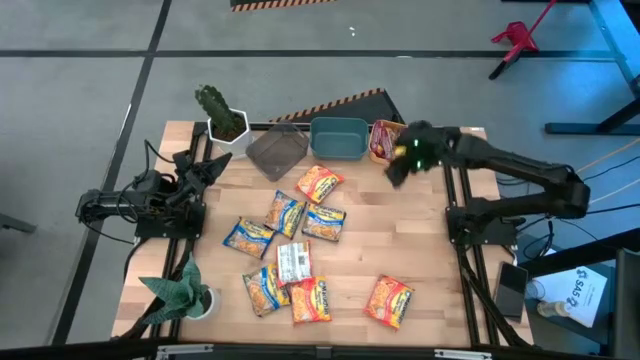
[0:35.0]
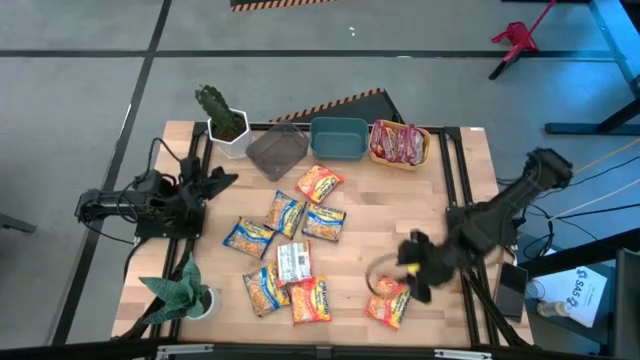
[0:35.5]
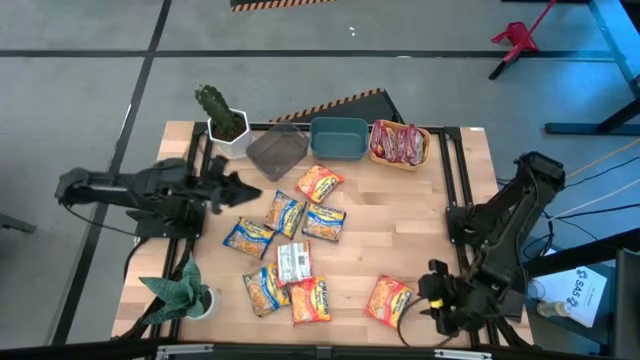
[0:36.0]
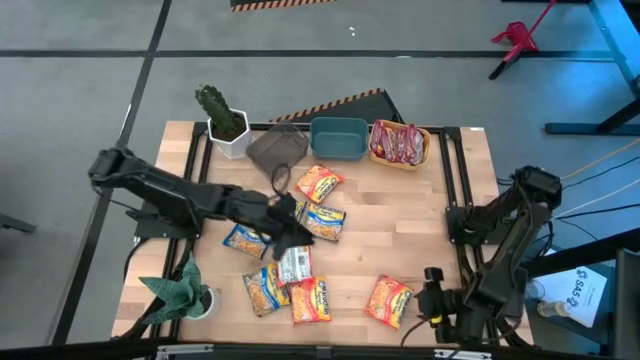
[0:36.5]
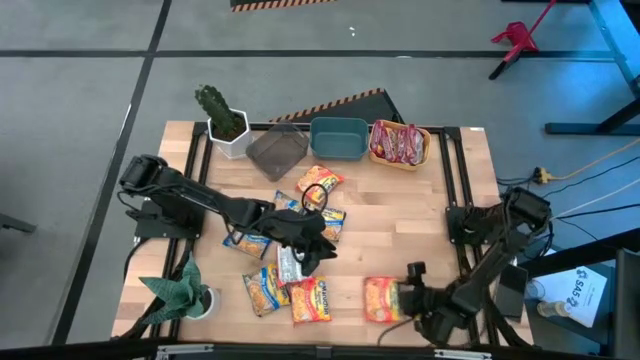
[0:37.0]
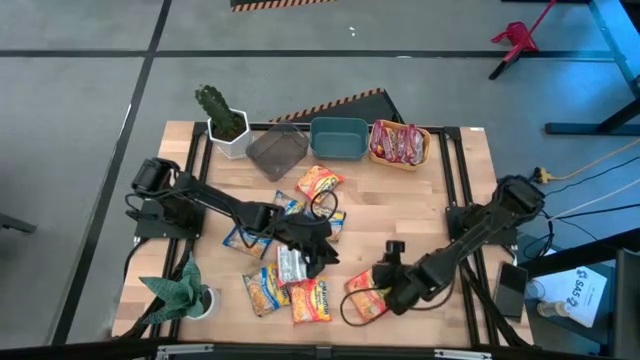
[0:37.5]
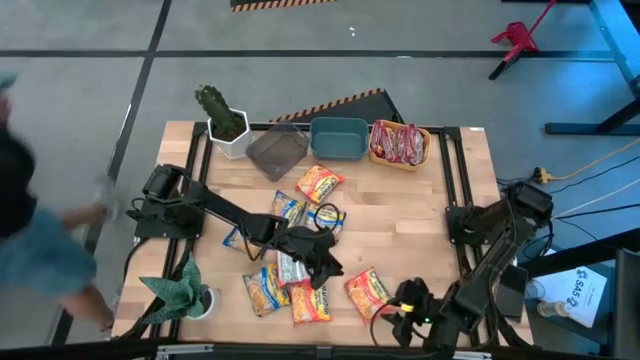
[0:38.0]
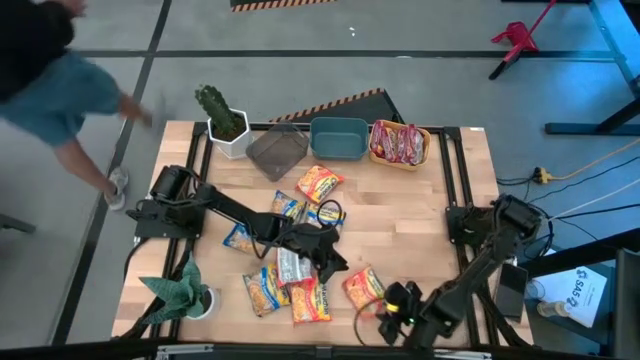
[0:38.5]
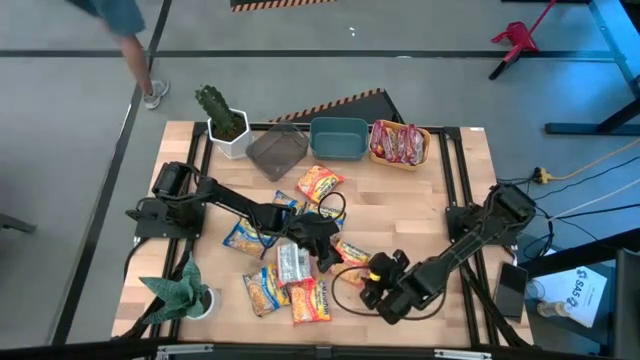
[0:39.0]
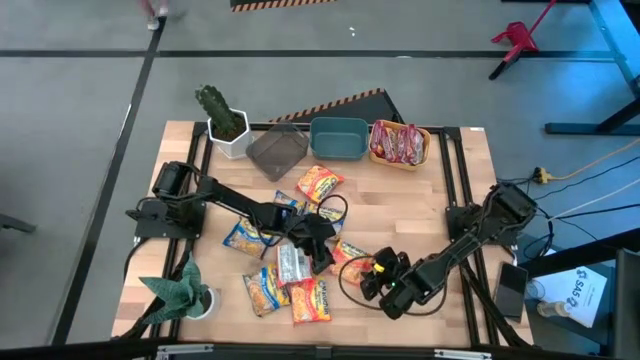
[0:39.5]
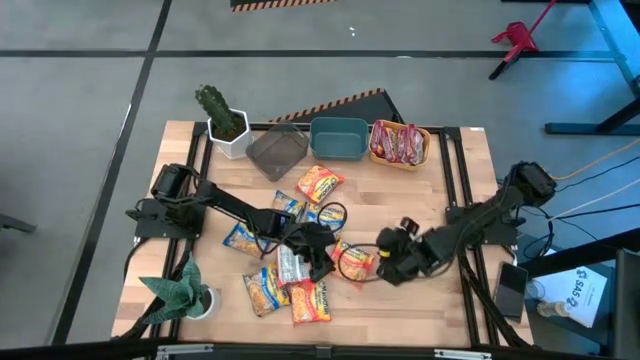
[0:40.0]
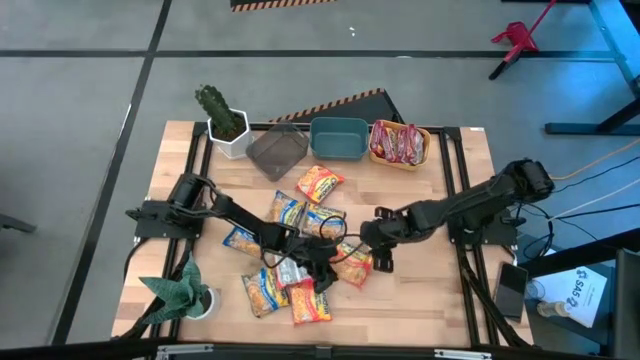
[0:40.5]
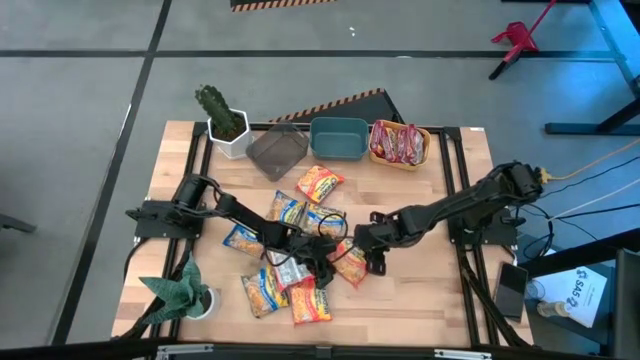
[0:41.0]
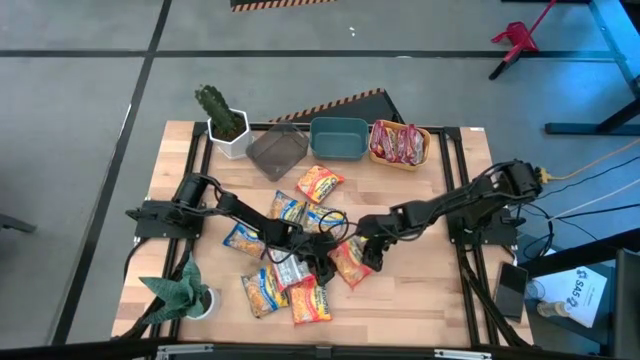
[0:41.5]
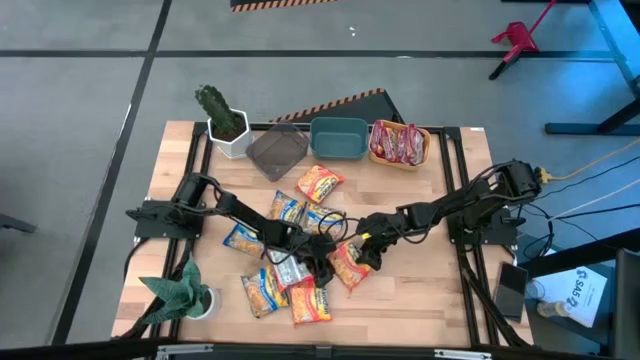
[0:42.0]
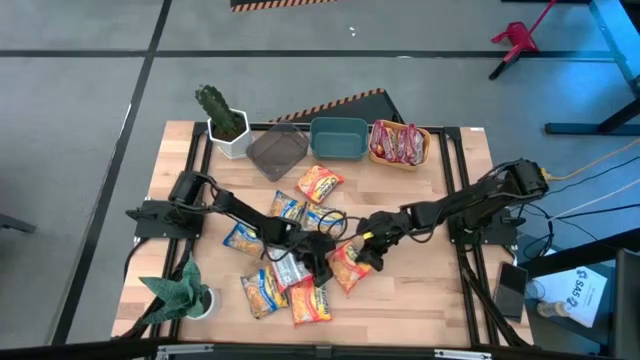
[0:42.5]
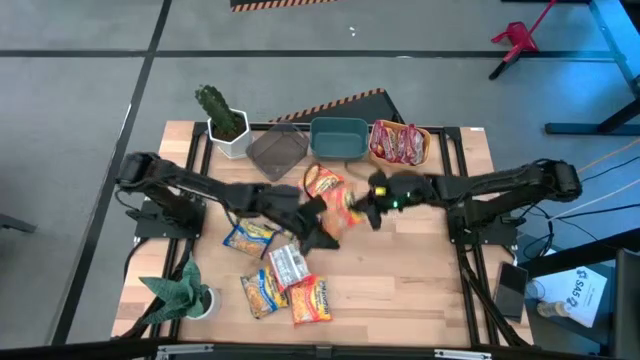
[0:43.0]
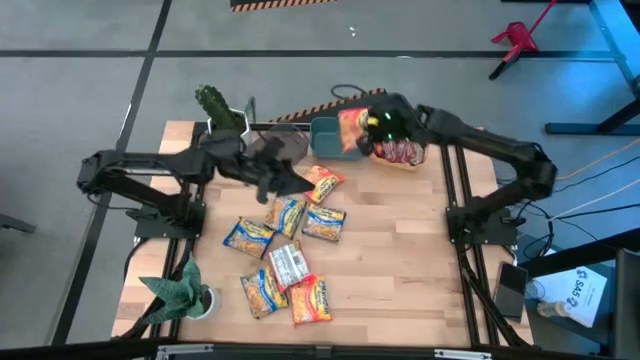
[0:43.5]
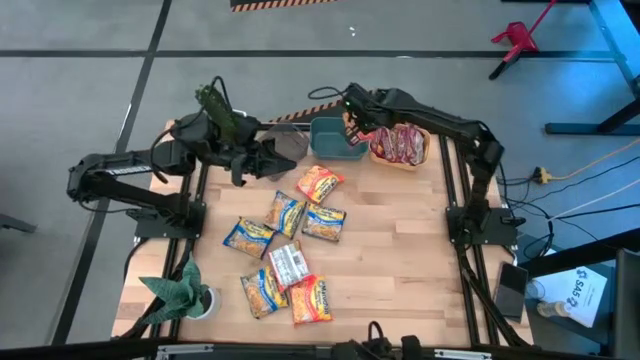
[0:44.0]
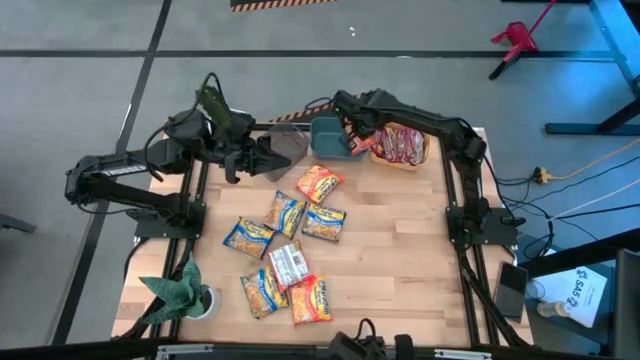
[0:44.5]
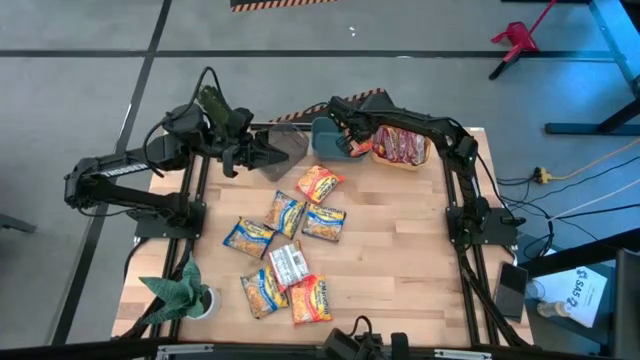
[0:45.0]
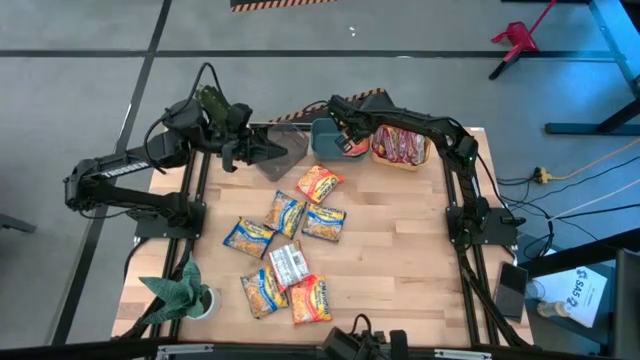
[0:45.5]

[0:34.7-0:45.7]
Task: Sort Maruchan noodles
Put the orange noodle pack into the blue bin

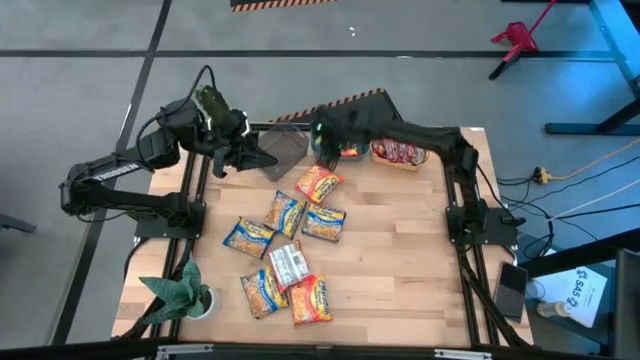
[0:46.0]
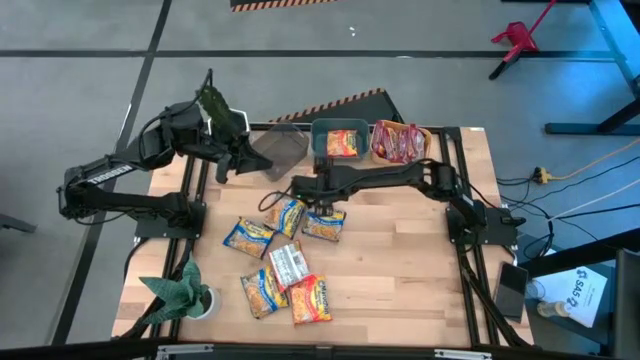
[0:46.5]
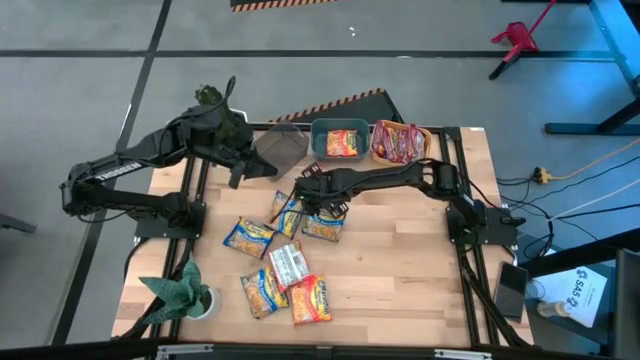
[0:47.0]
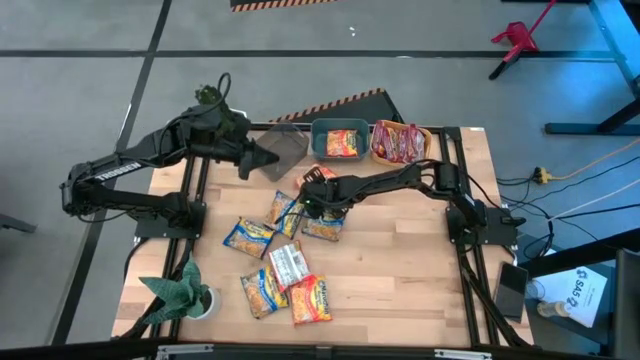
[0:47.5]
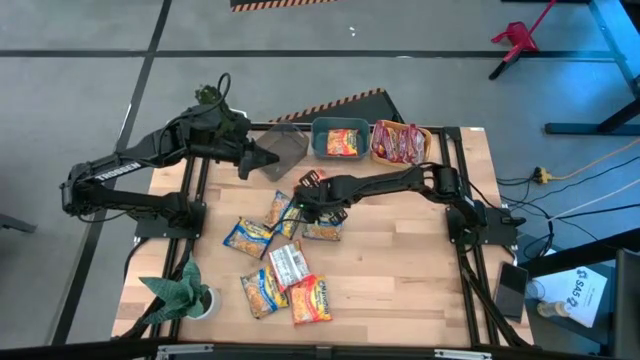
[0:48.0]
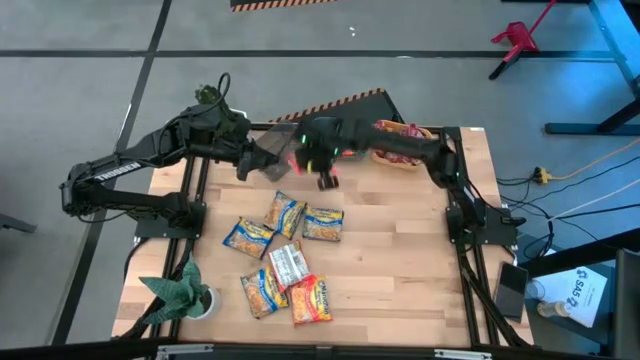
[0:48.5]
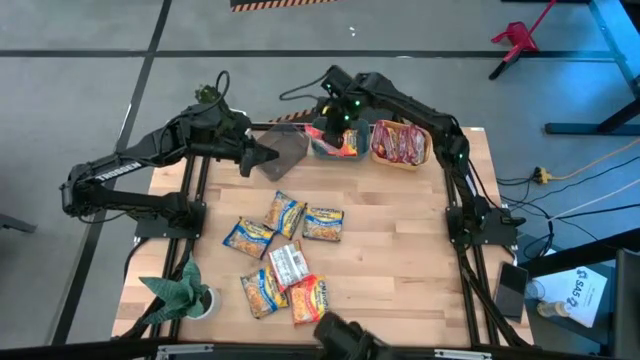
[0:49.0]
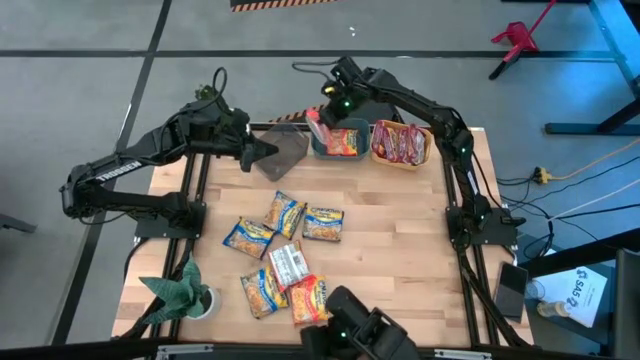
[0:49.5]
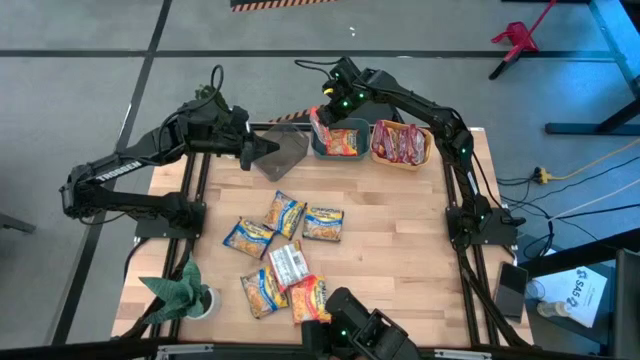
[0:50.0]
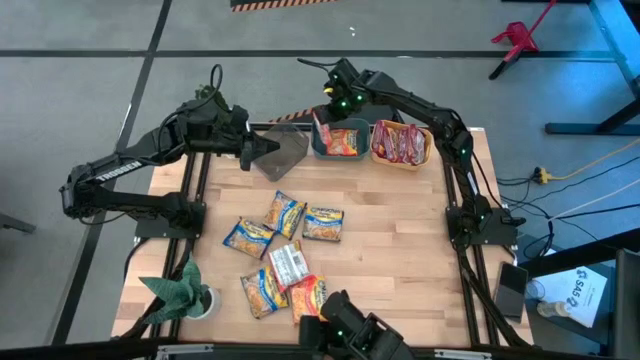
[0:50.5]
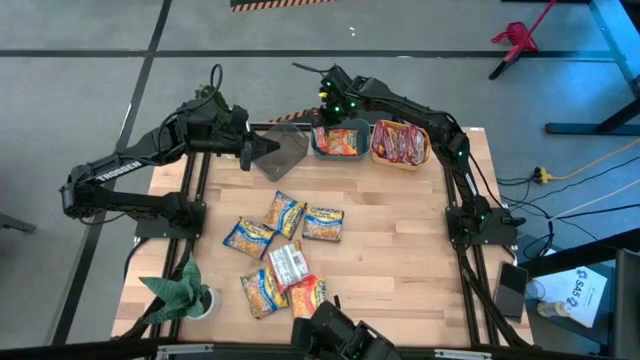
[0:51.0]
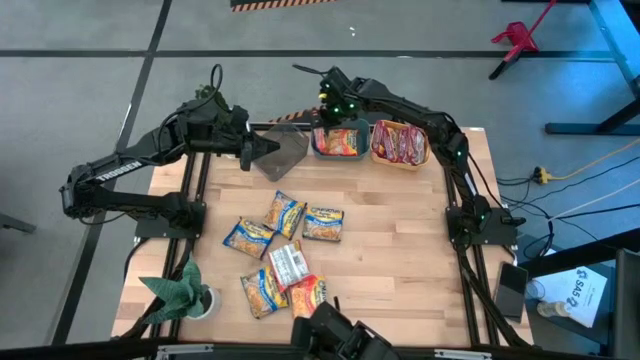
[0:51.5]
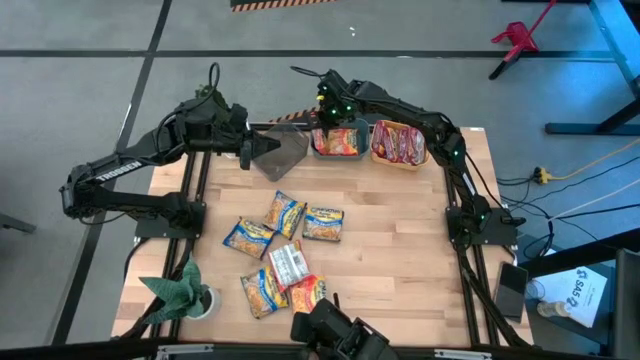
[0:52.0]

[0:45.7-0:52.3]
Put the top orange noodle pack into the blue bin

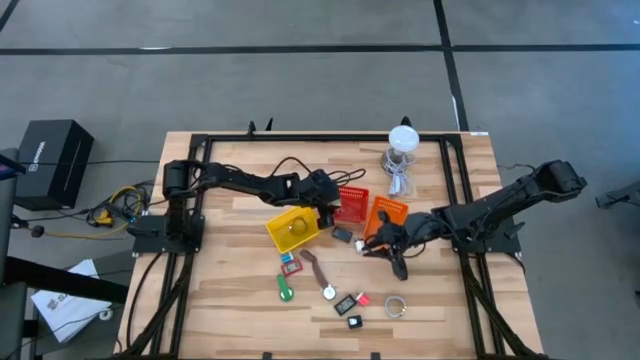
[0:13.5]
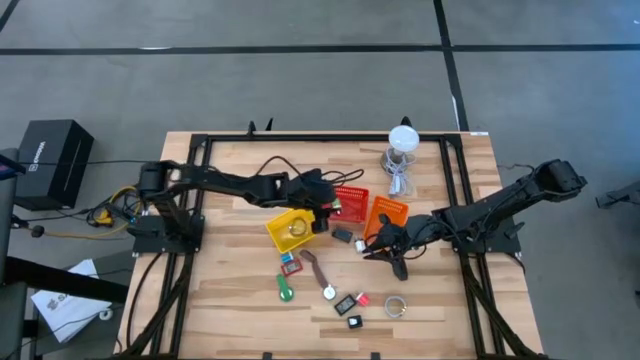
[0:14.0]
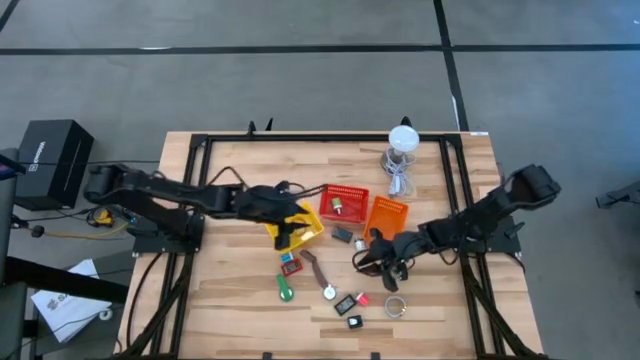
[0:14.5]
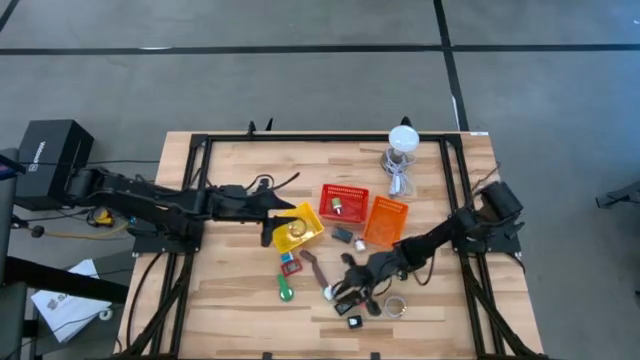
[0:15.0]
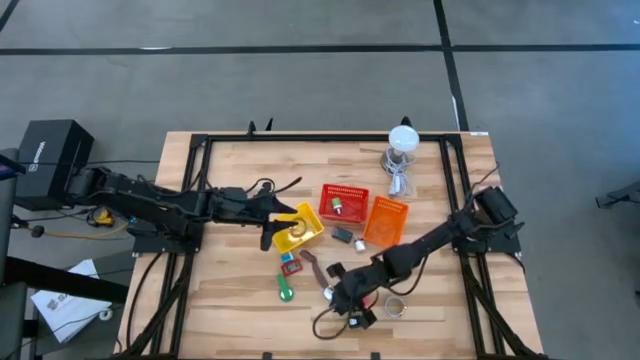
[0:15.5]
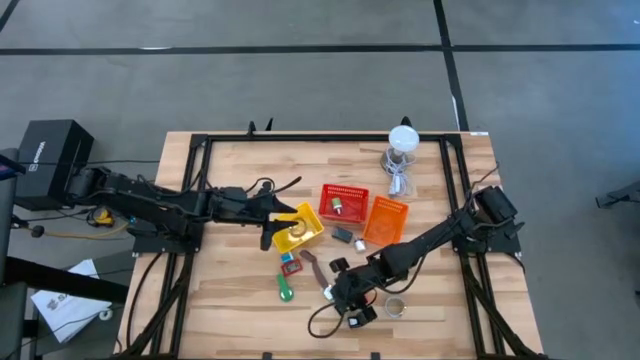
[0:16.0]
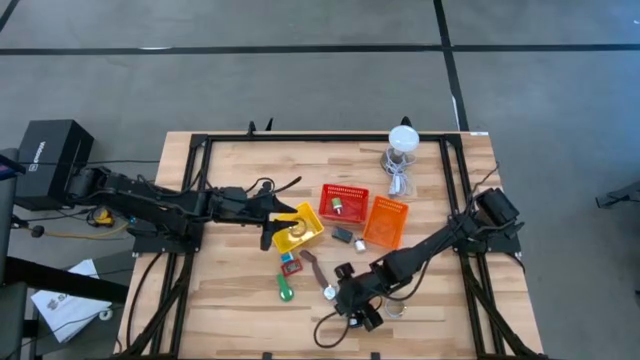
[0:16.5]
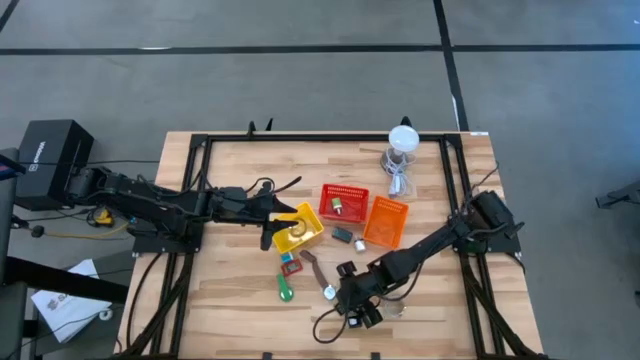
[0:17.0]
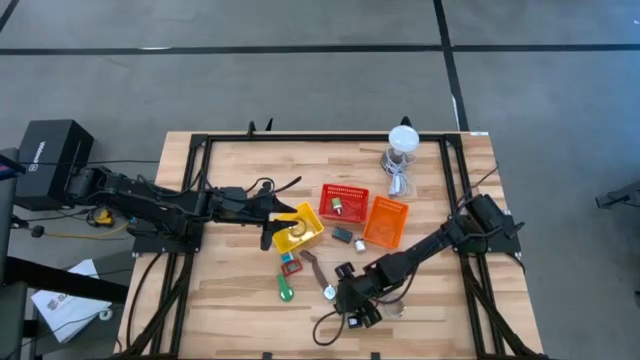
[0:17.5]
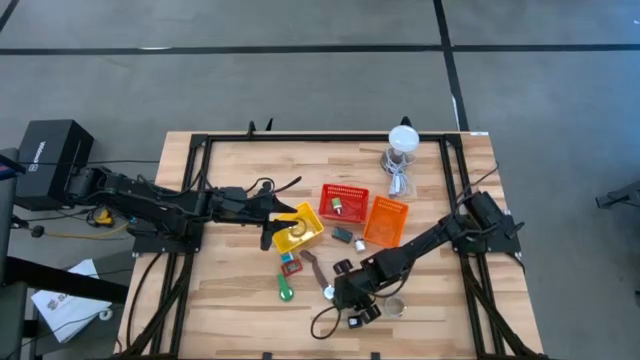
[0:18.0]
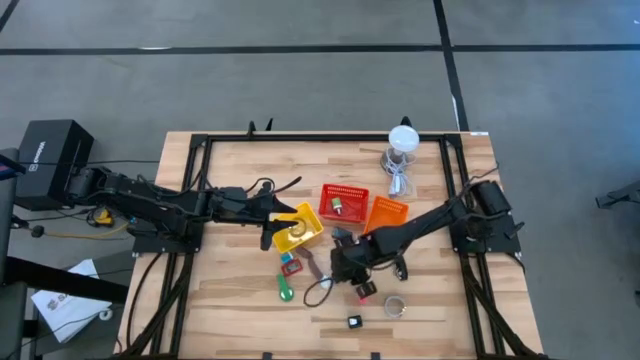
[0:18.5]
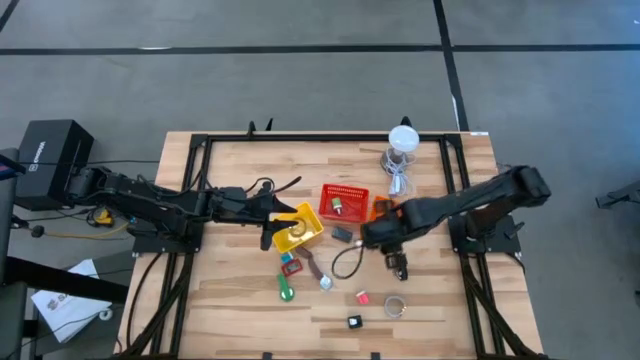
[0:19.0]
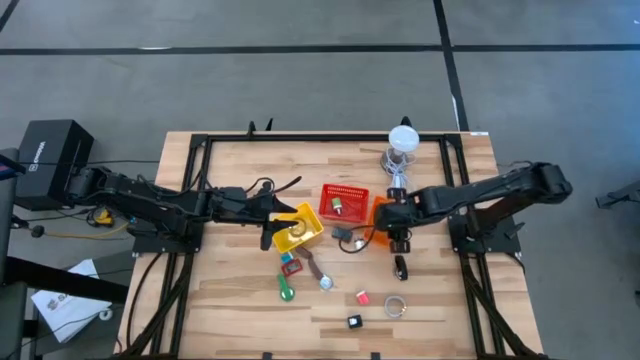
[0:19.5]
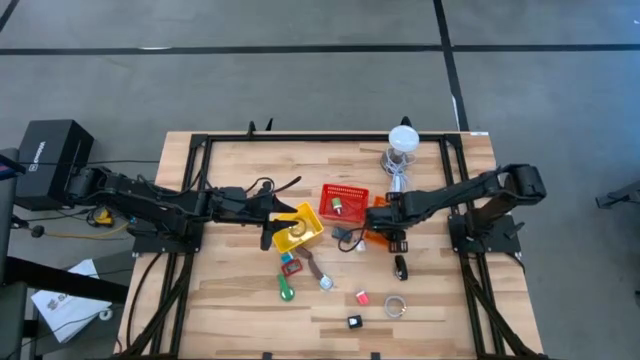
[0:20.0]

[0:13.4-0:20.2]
Task: Pick & Place Office items
Put the black digital clock into the orange bin
